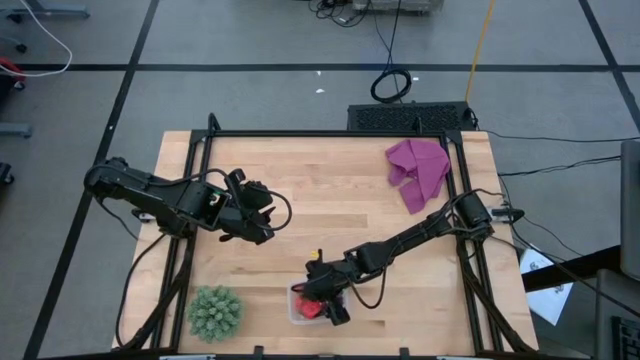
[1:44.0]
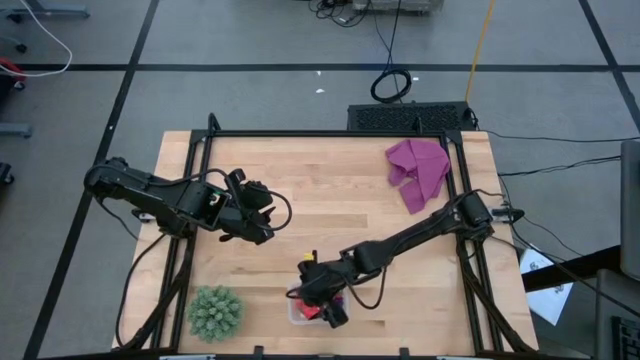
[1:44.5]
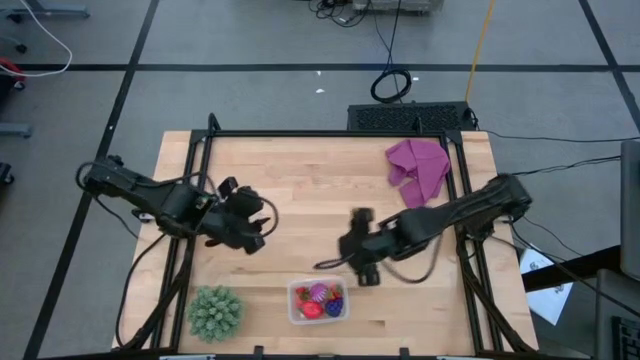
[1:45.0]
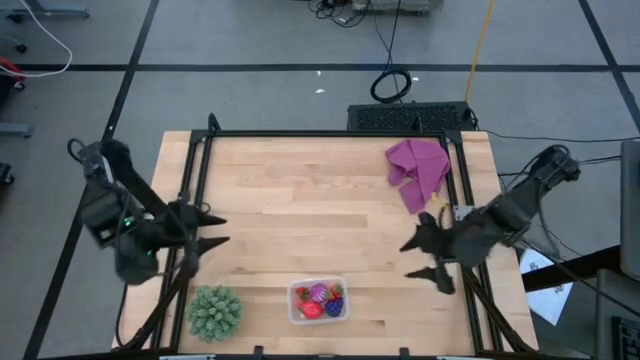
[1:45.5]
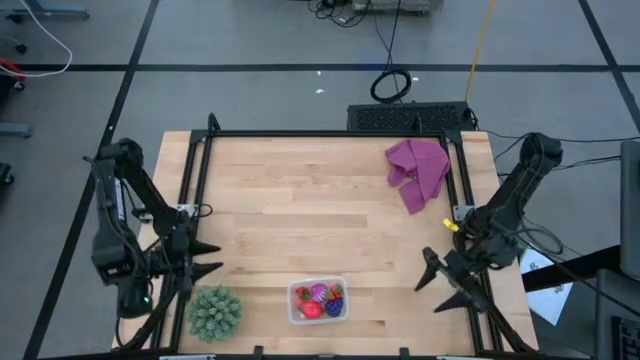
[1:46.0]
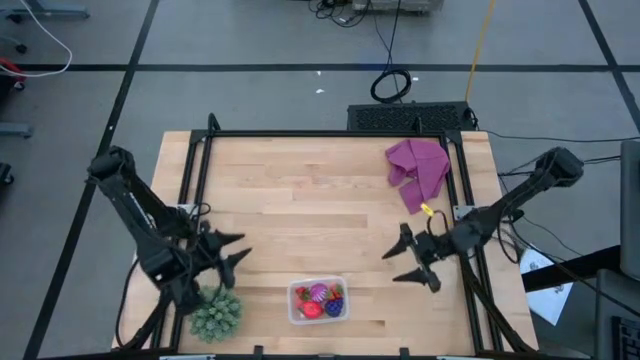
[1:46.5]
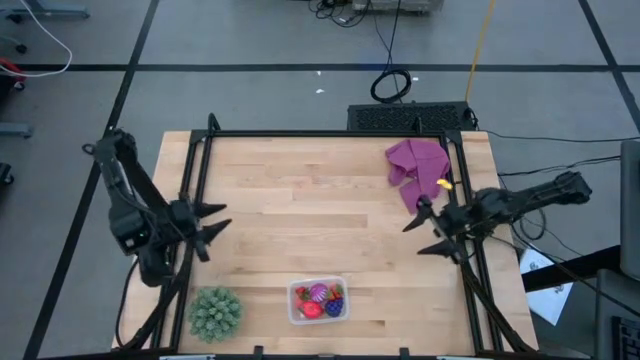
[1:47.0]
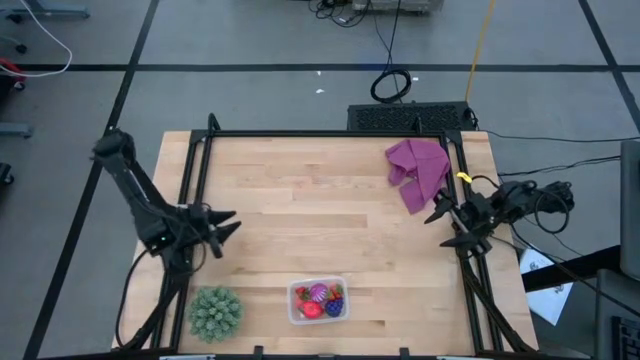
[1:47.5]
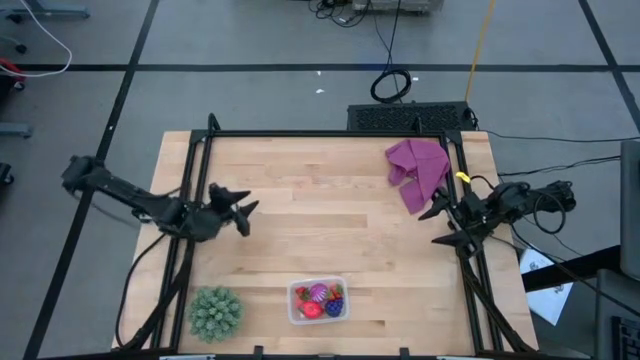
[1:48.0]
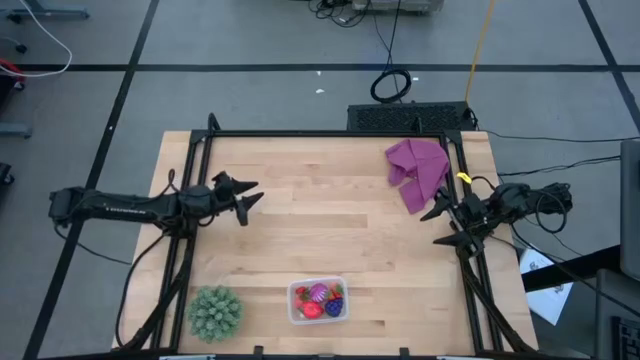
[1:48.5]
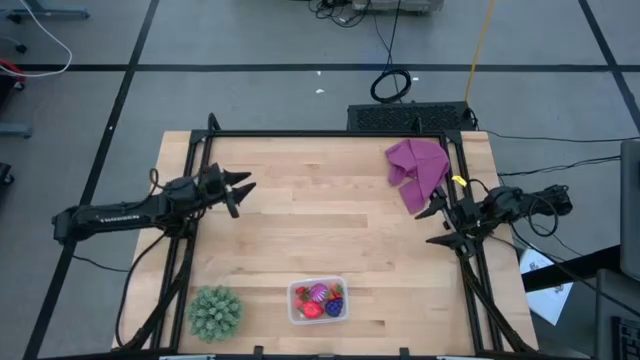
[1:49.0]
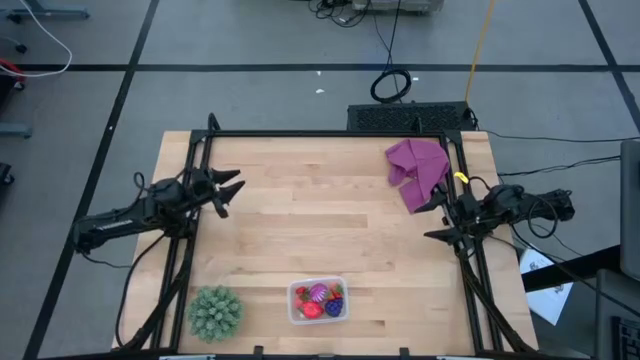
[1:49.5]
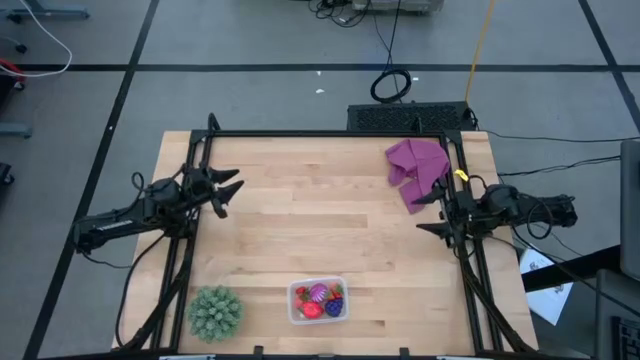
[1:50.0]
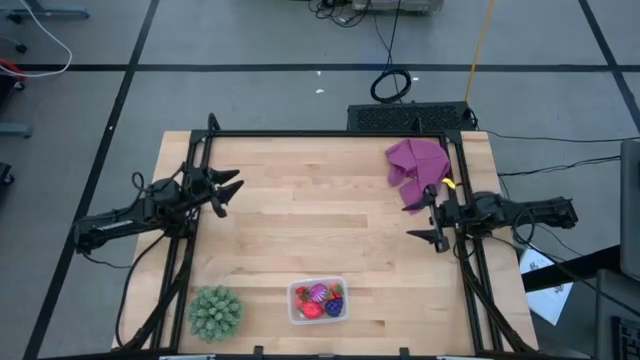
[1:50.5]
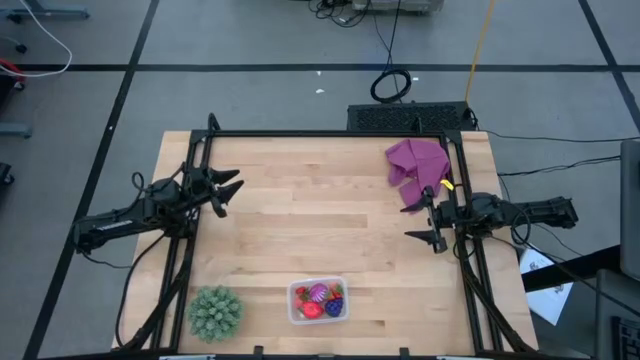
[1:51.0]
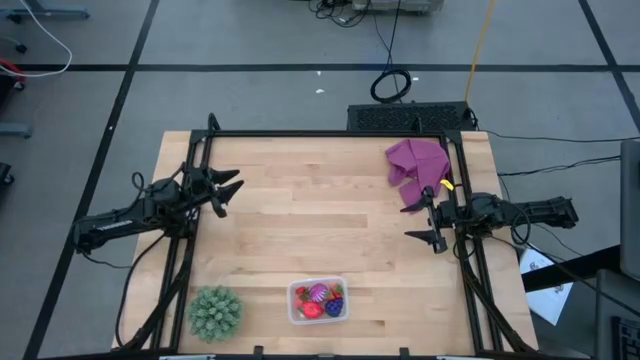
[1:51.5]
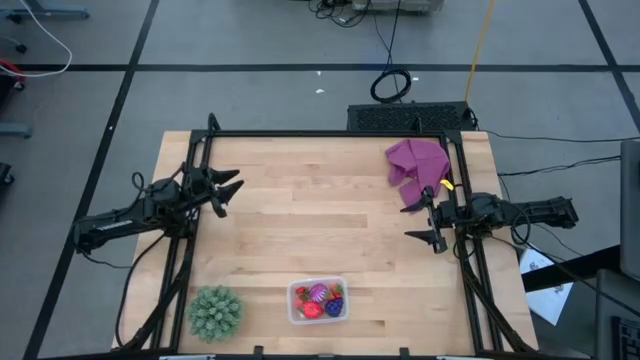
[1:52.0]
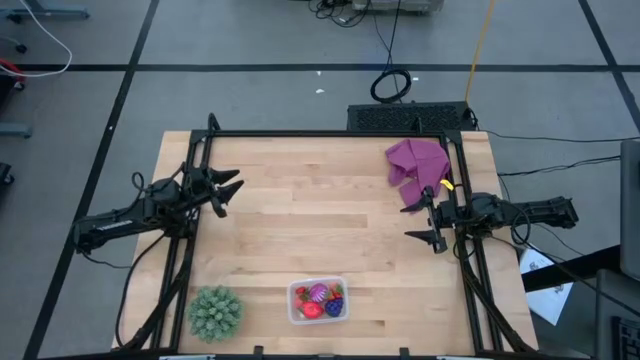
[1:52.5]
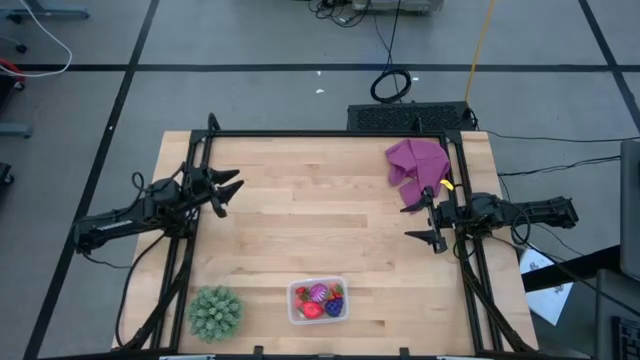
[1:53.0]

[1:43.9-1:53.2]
Task: Pick and placing Produce into tupperware
Return to Home Position

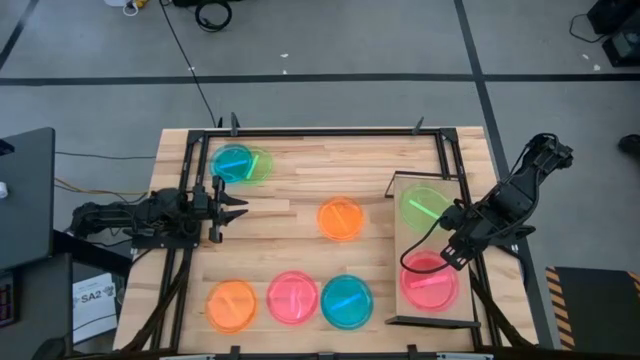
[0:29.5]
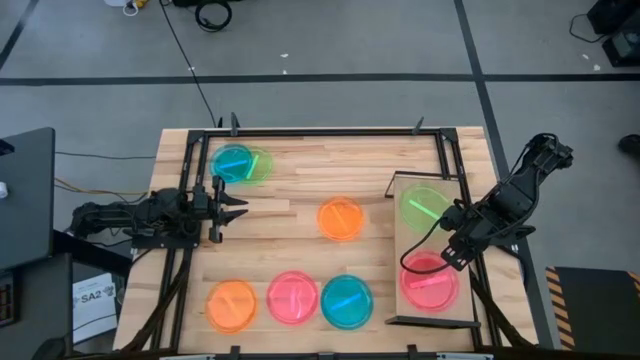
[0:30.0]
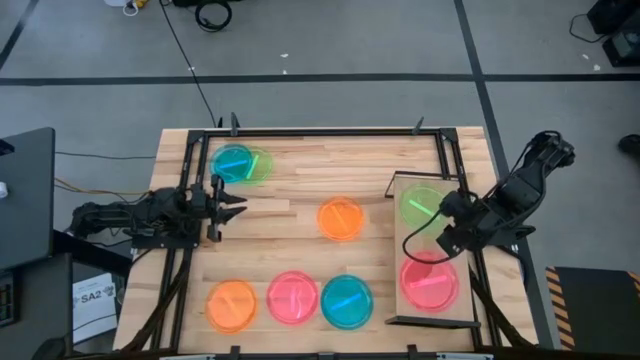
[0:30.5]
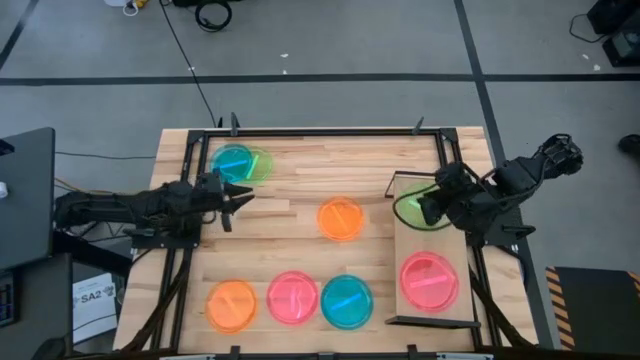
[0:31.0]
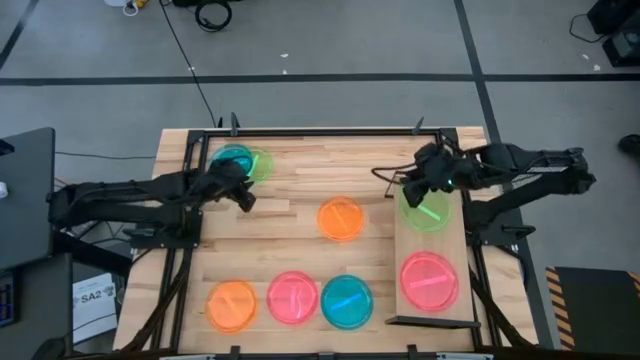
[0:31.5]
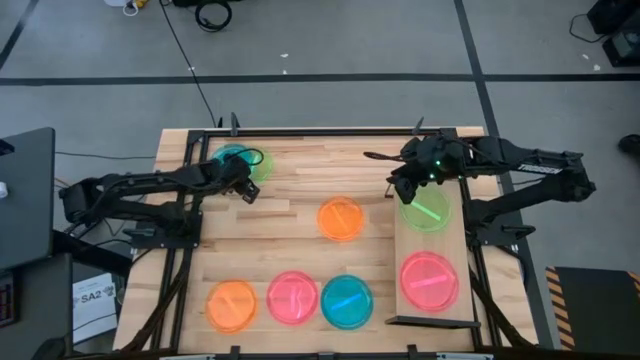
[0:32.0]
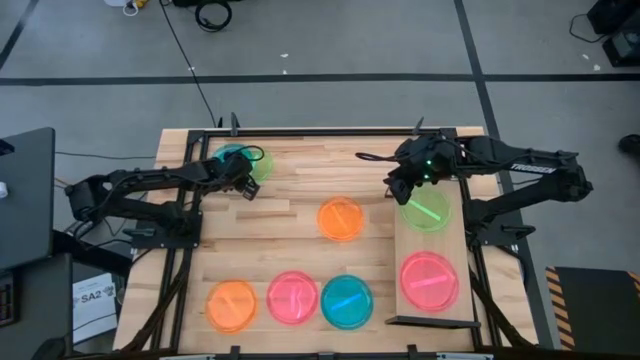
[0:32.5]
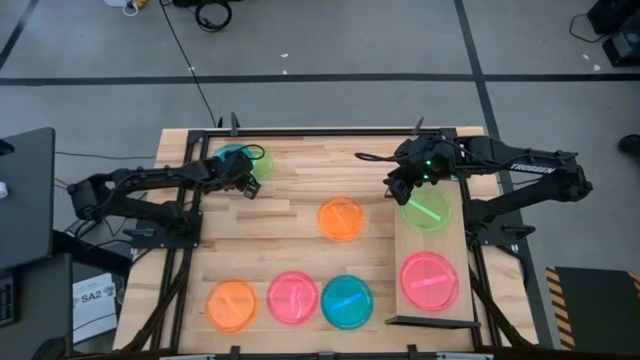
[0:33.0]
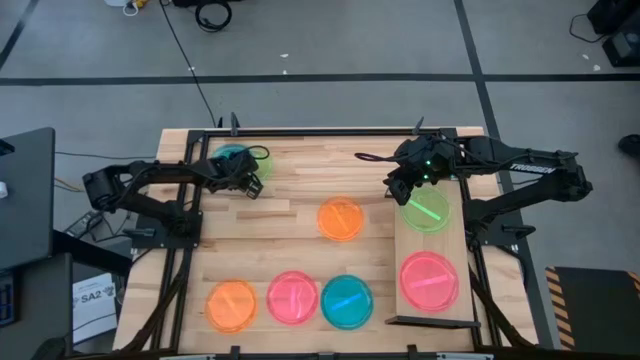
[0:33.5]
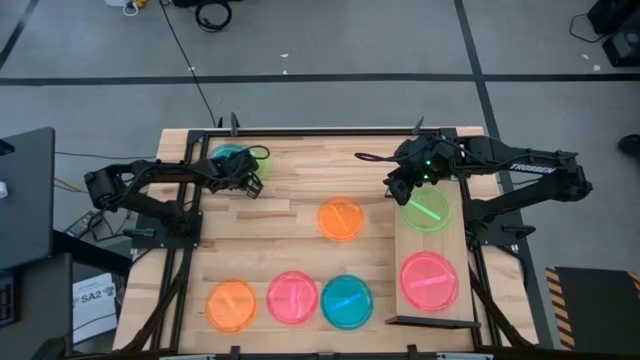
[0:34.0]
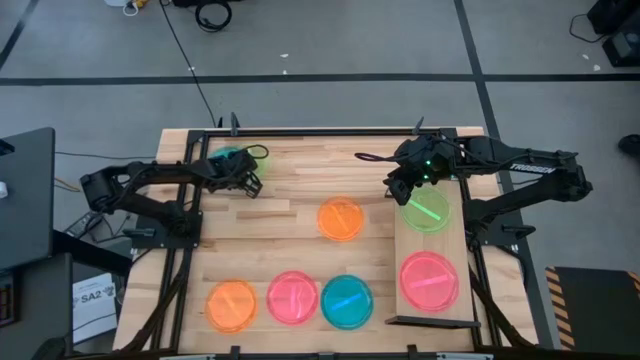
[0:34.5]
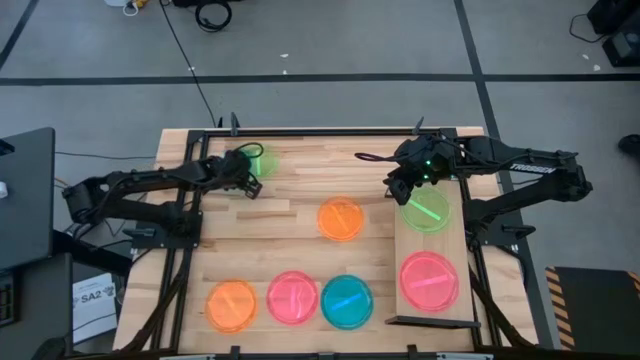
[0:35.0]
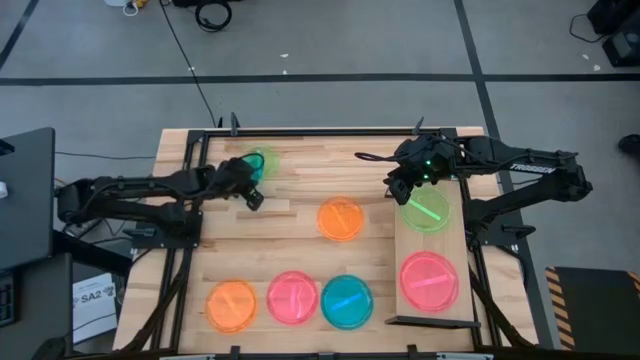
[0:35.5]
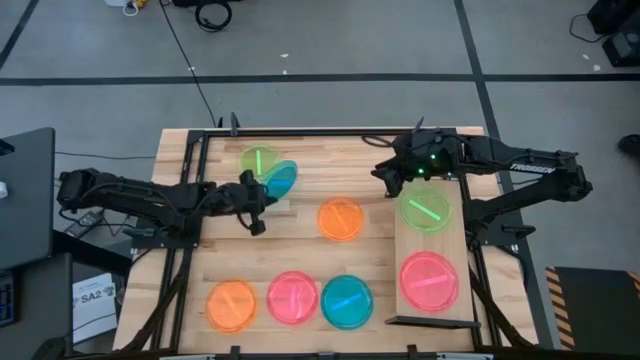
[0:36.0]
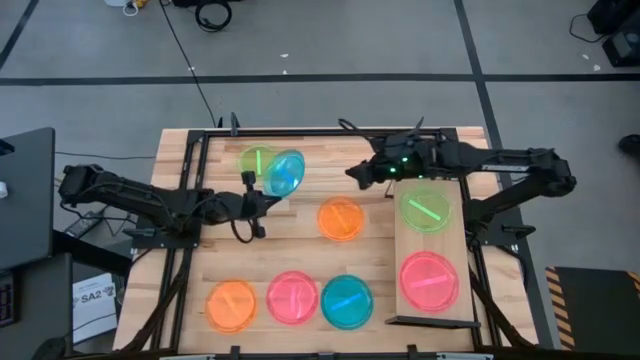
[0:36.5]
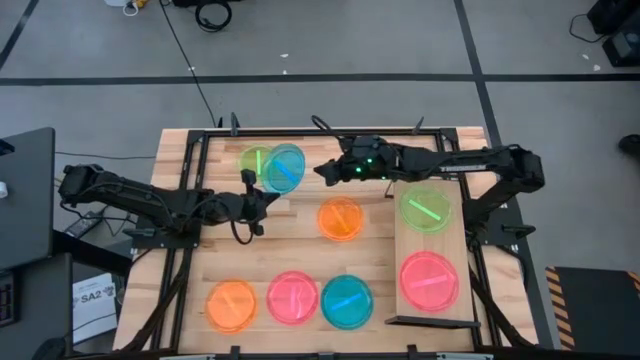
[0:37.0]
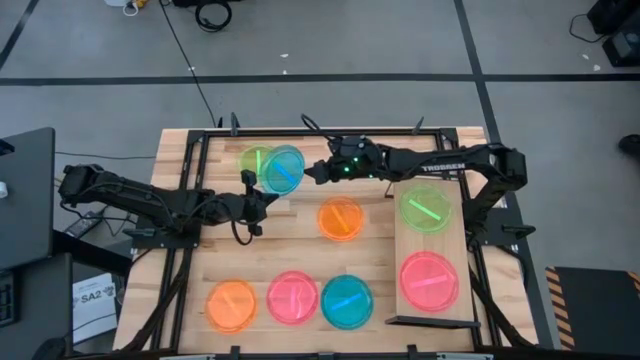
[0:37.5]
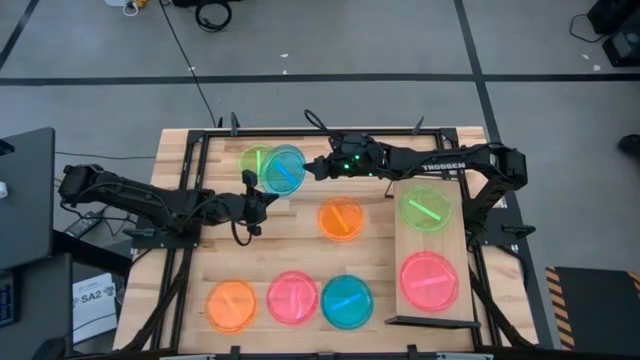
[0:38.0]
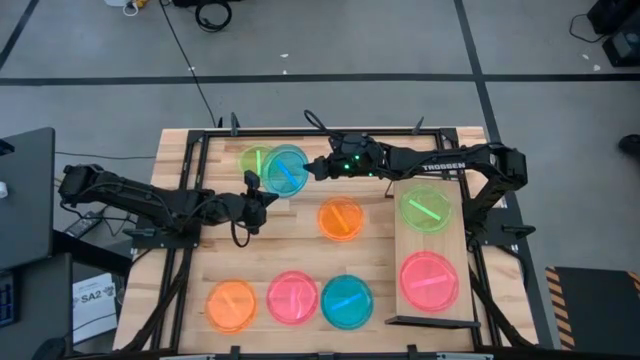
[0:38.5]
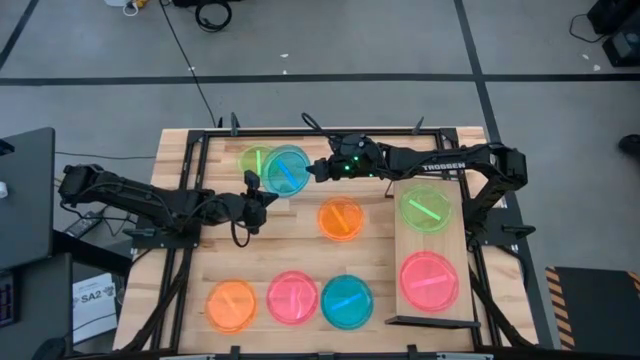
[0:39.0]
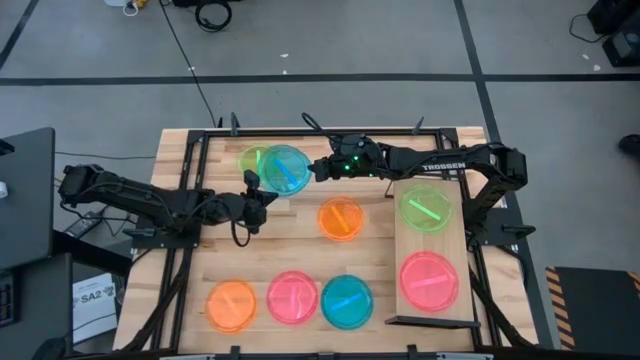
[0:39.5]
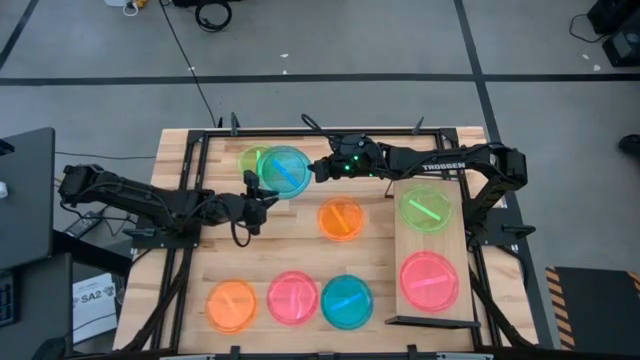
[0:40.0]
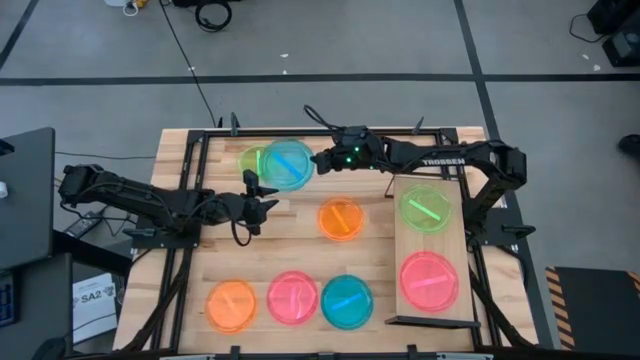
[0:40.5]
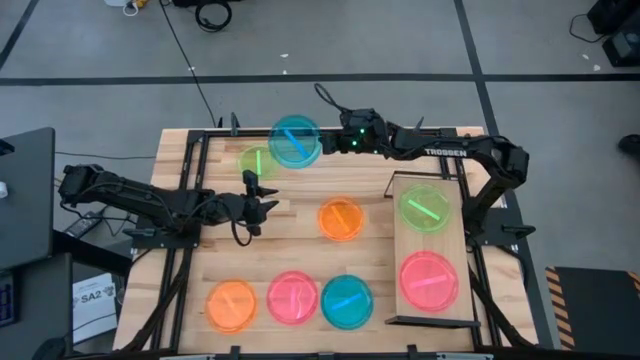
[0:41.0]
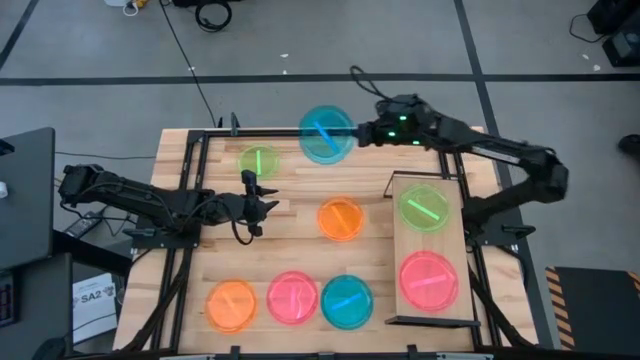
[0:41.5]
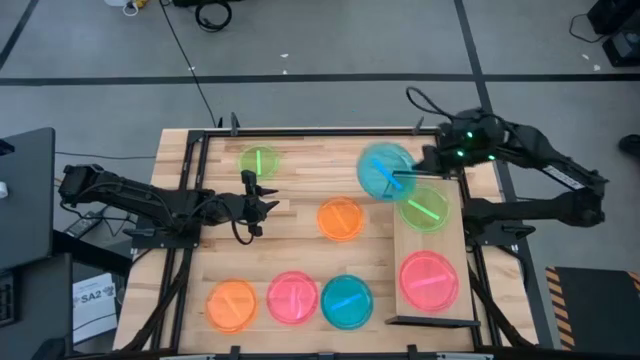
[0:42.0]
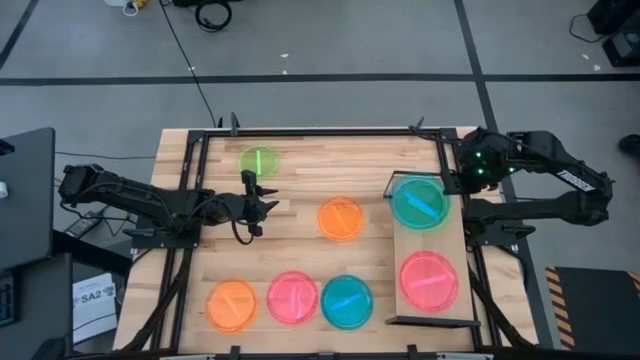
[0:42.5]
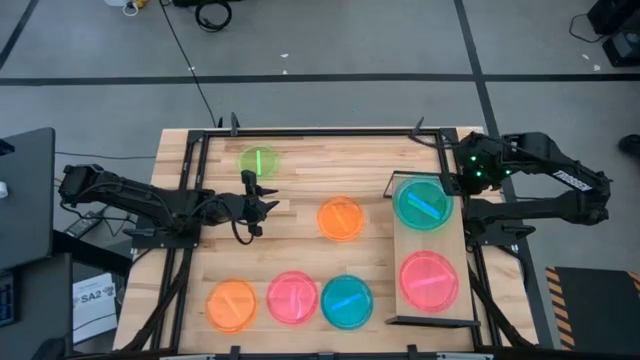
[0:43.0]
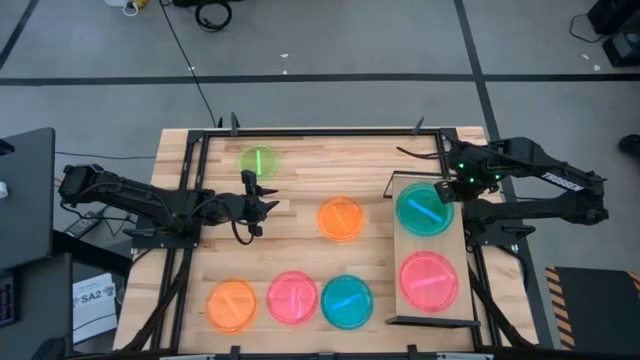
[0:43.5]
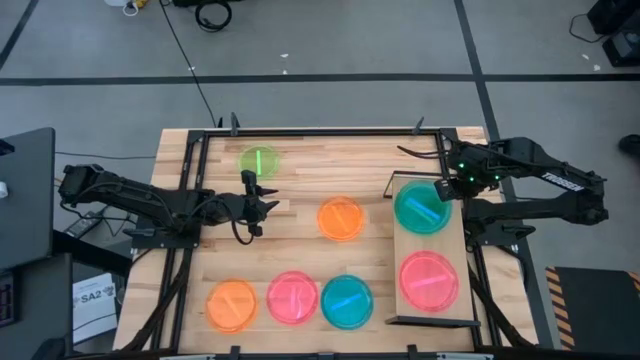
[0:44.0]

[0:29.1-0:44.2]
Task: Place and stack plates onto a shelf
Stack the top blue transparent plate on top of the green transparent plate on the shelf
